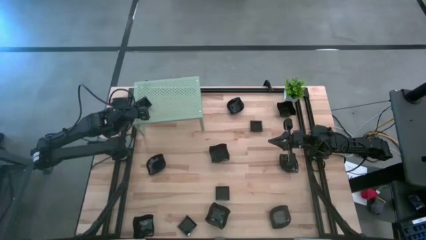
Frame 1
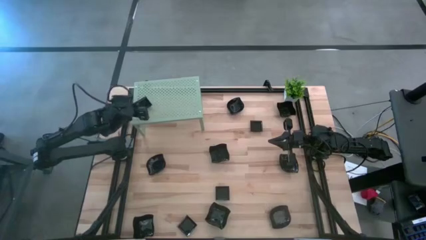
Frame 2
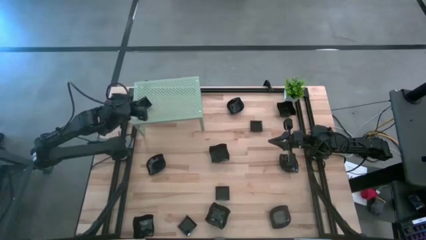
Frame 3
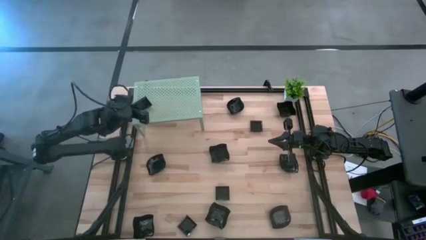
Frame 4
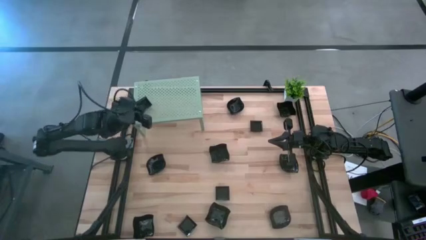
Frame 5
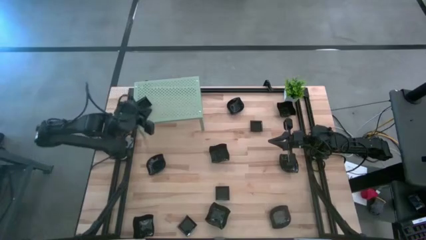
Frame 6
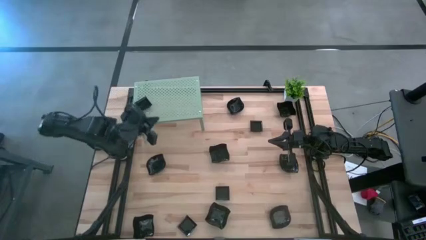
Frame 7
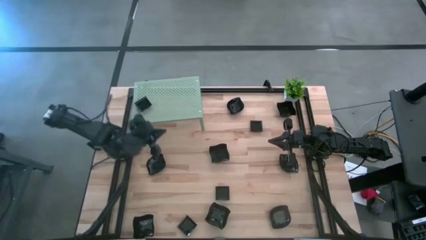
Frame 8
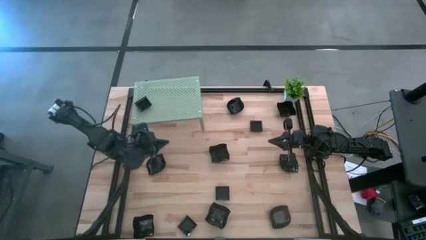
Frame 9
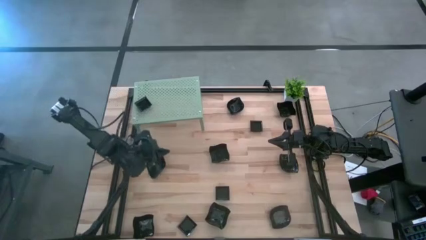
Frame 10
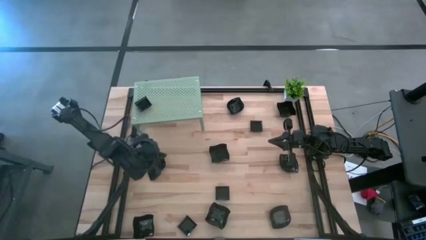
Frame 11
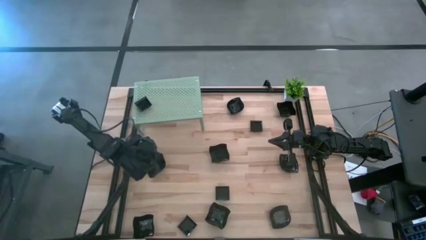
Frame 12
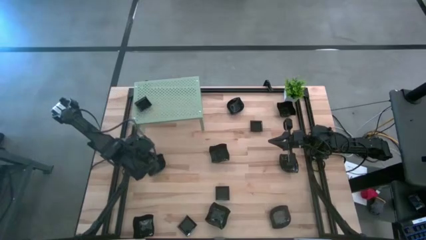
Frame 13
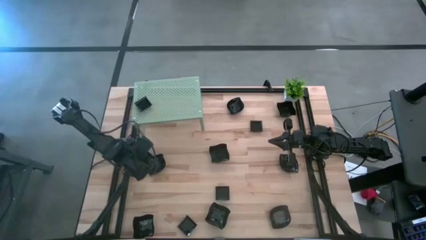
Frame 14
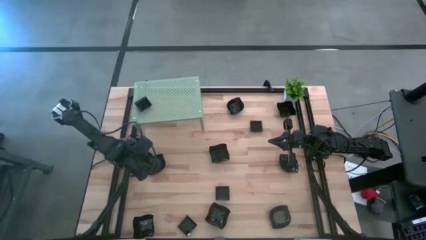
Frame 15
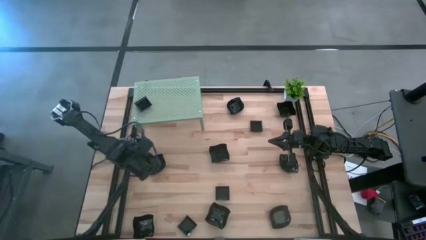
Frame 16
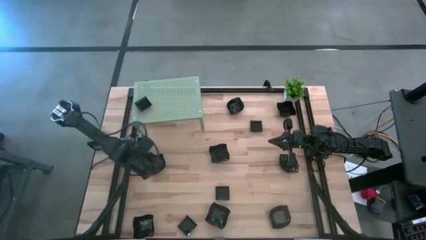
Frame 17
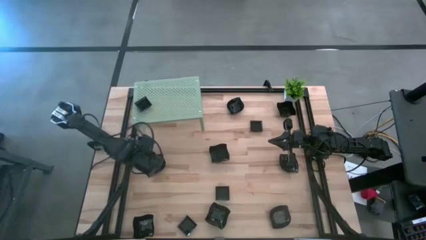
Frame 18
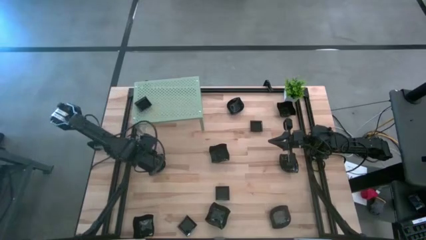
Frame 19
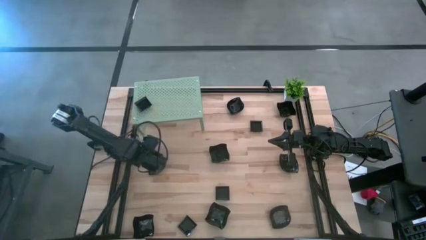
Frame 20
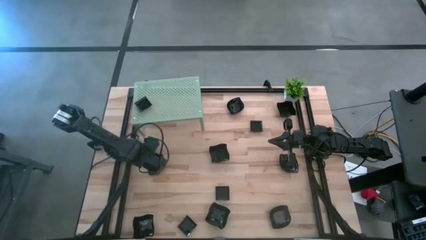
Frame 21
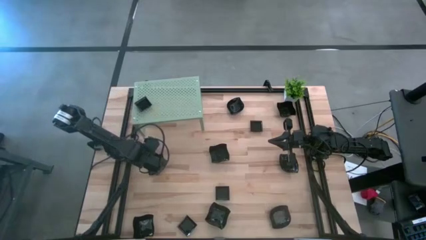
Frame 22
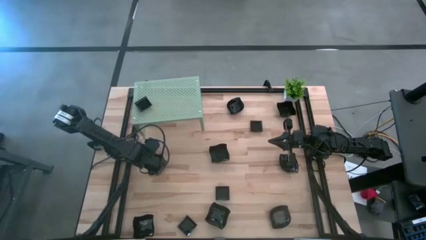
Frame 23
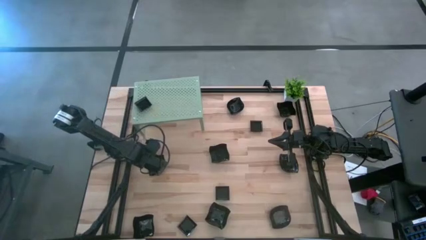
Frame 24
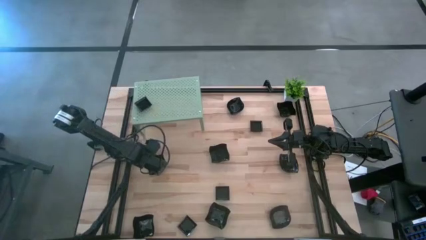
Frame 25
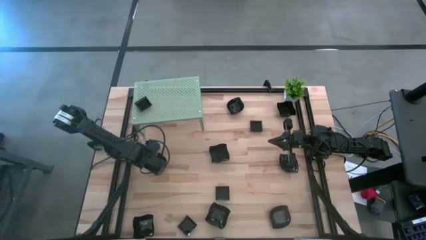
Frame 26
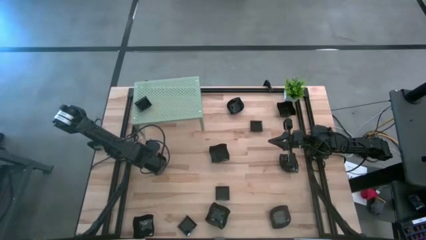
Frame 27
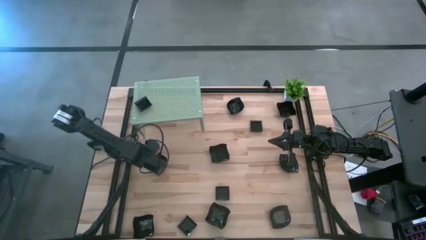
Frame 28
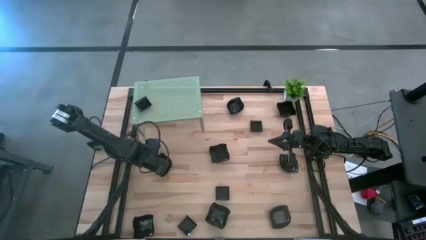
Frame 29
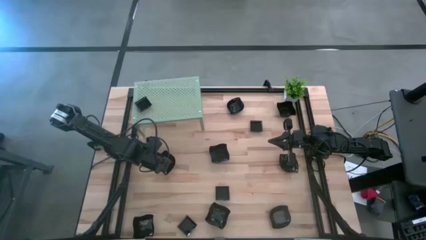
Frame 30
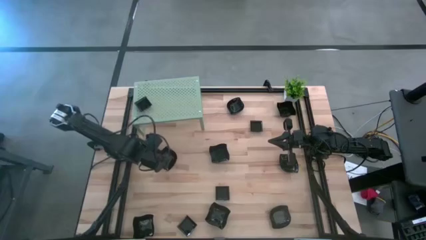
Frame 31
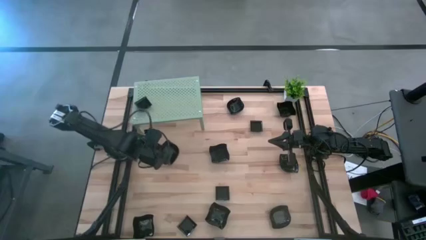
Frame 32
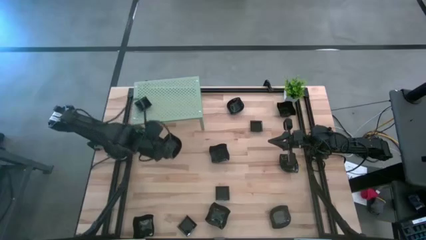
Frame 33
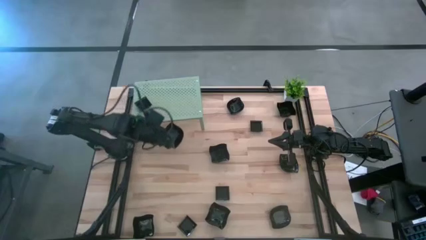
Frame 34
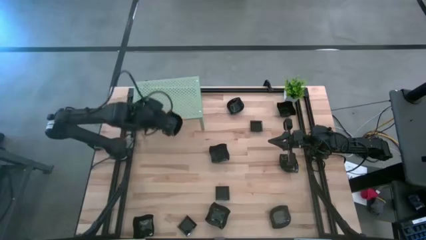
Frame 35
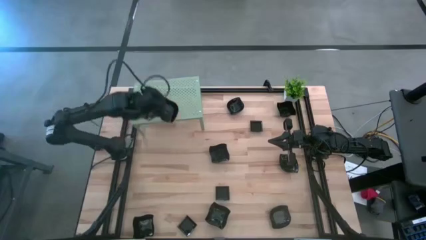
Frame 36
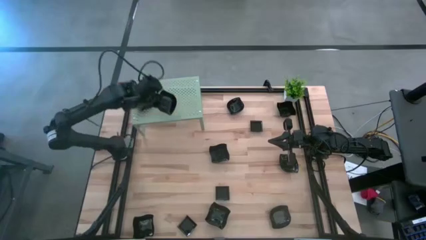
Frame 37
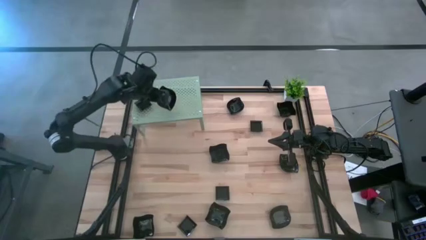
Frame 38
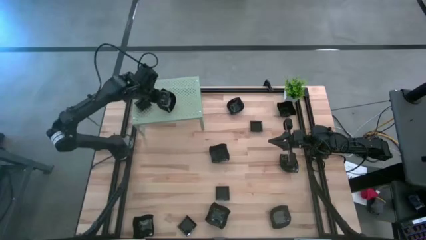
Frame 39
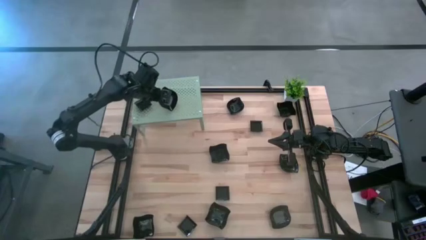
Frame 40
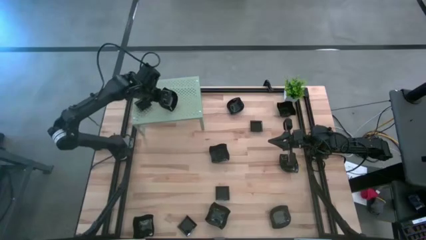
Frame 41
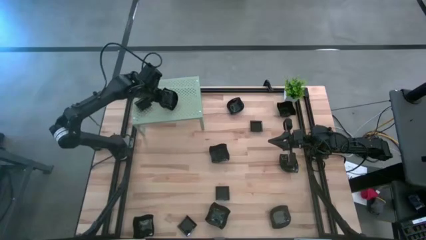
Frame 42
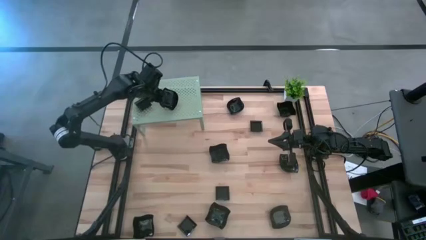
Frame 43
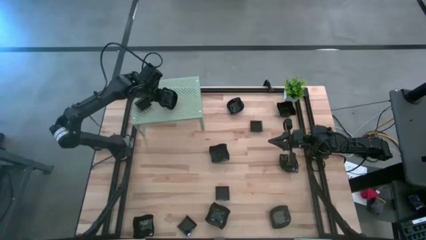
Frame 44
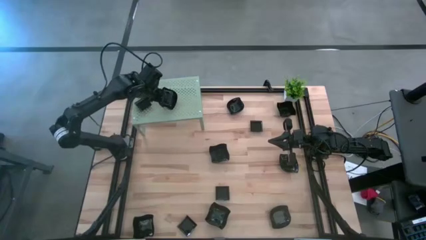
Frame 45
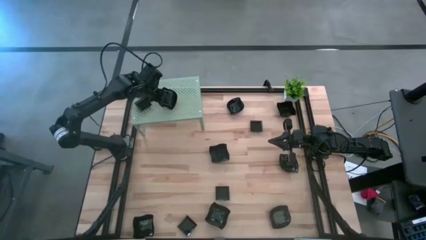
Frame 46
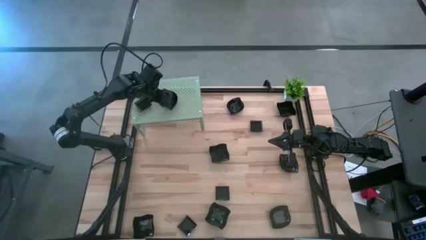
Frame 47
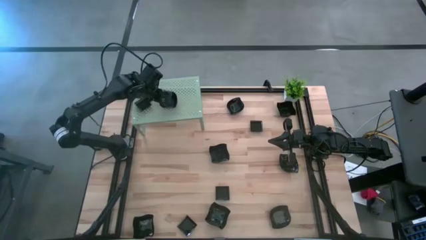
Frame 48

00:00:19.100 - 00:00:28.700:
Task: Pick & Place Mini shaped plates
Put the black leaf shaped plate on the shelf
